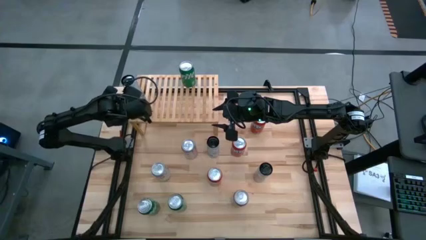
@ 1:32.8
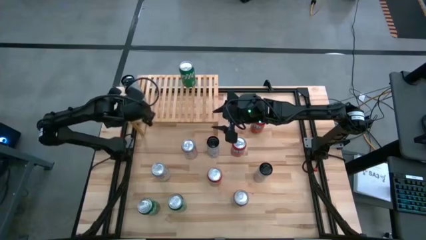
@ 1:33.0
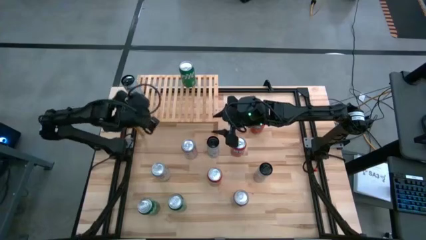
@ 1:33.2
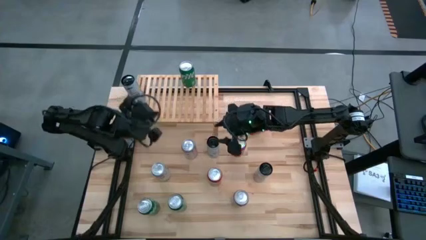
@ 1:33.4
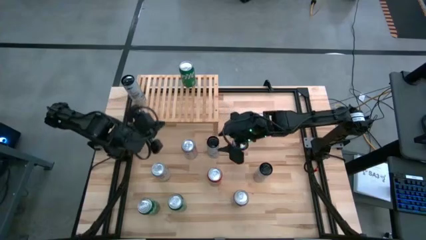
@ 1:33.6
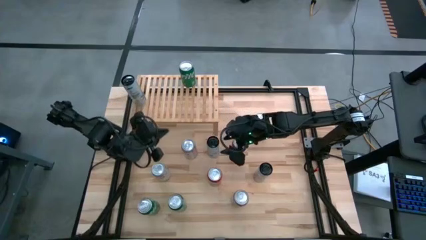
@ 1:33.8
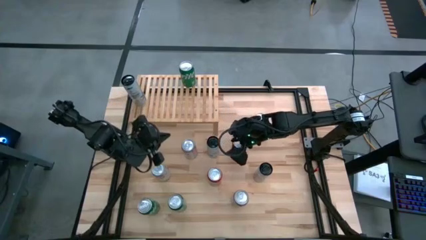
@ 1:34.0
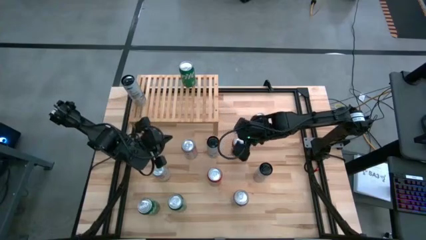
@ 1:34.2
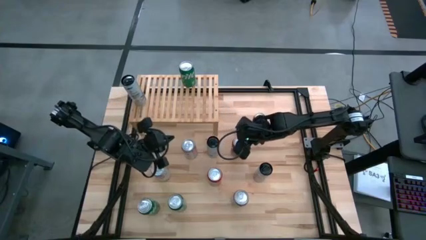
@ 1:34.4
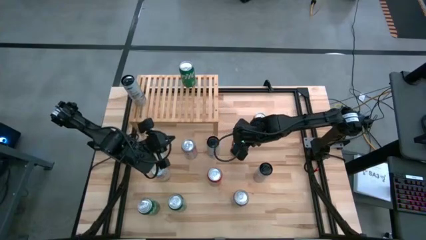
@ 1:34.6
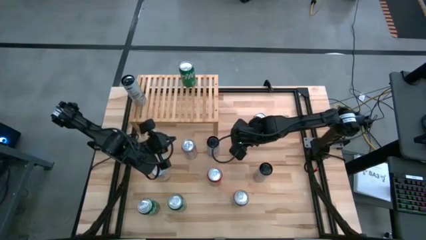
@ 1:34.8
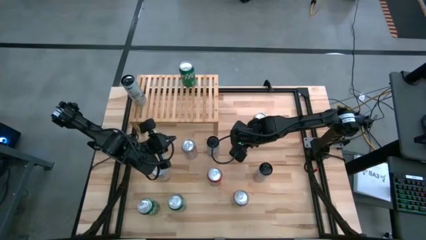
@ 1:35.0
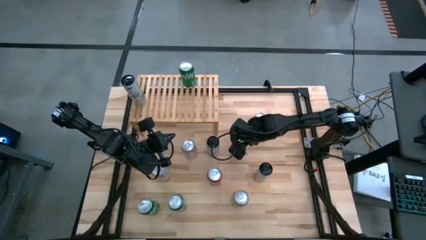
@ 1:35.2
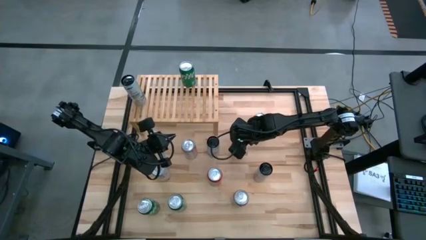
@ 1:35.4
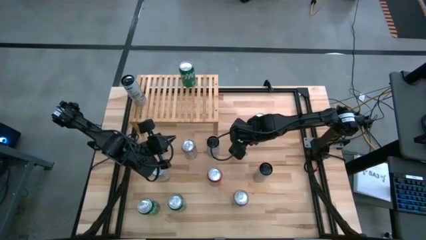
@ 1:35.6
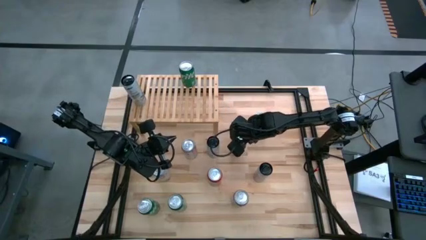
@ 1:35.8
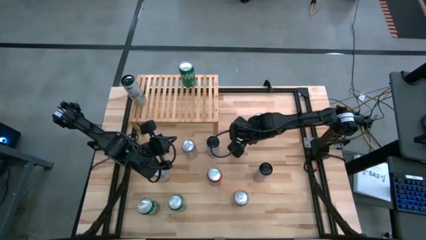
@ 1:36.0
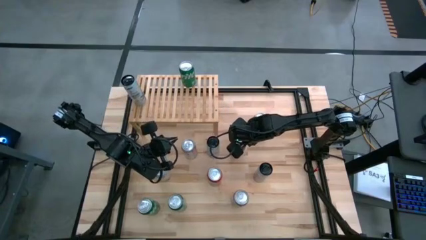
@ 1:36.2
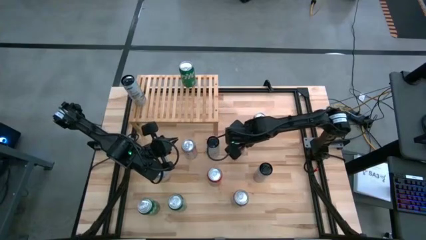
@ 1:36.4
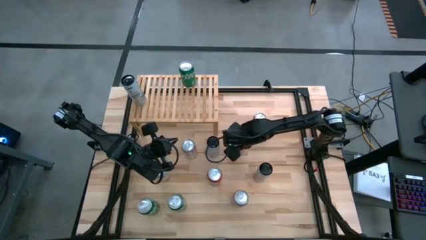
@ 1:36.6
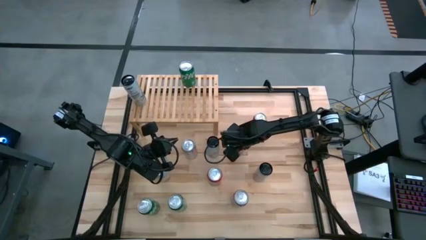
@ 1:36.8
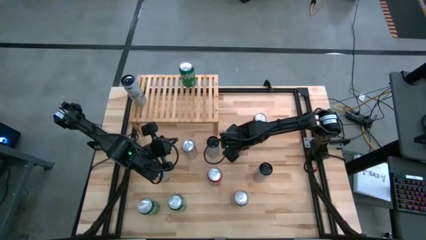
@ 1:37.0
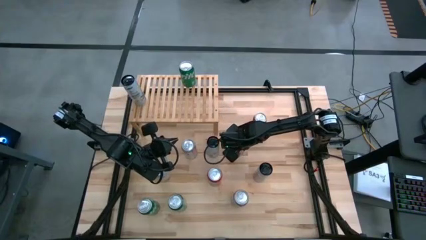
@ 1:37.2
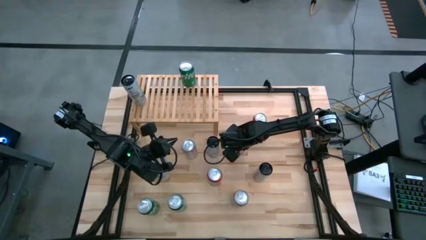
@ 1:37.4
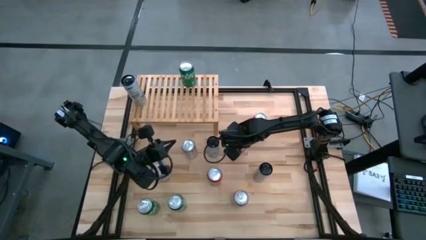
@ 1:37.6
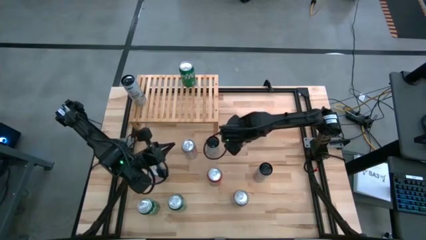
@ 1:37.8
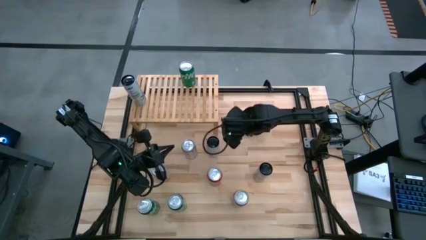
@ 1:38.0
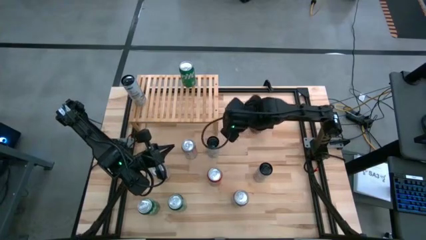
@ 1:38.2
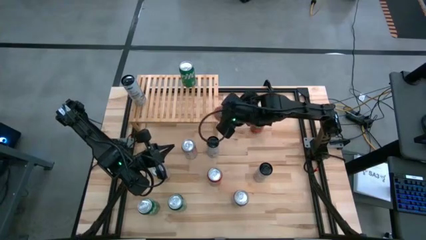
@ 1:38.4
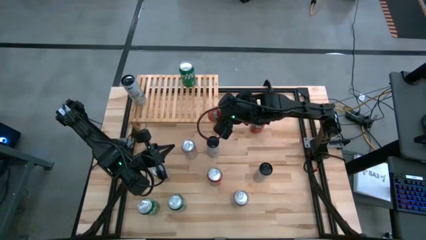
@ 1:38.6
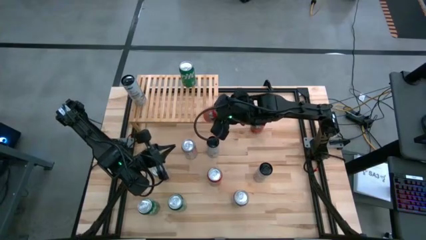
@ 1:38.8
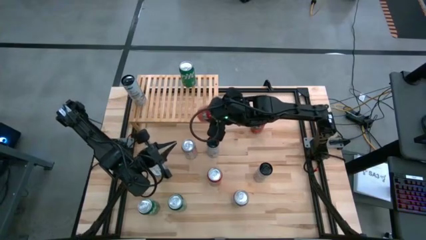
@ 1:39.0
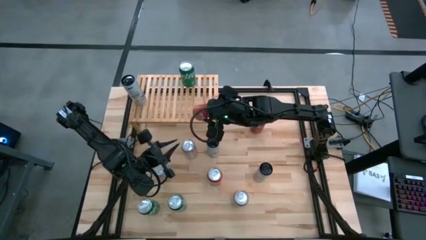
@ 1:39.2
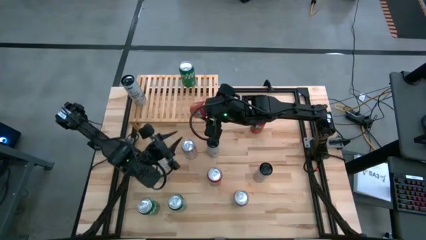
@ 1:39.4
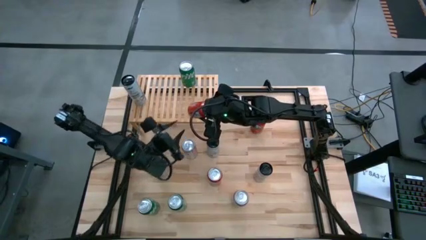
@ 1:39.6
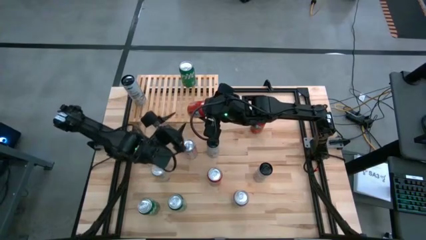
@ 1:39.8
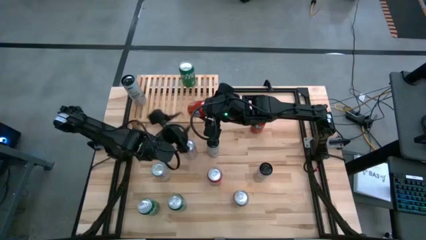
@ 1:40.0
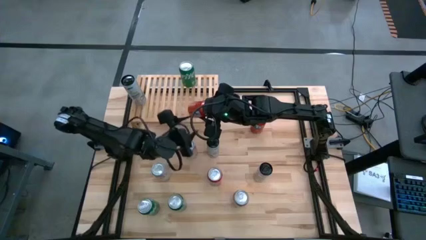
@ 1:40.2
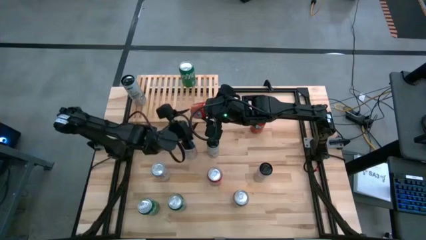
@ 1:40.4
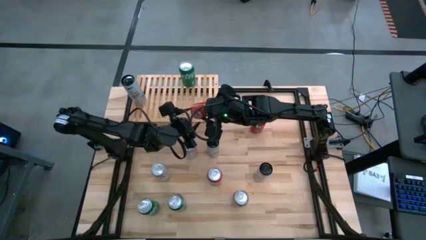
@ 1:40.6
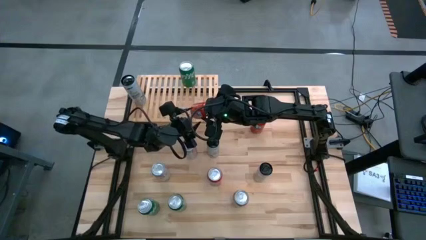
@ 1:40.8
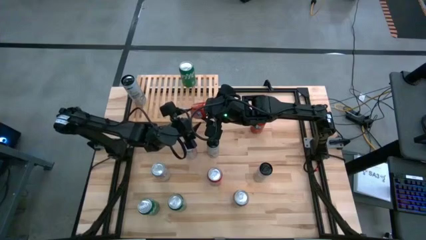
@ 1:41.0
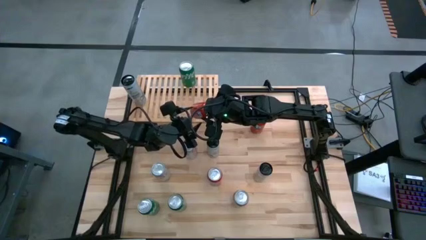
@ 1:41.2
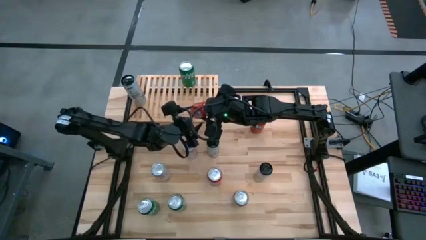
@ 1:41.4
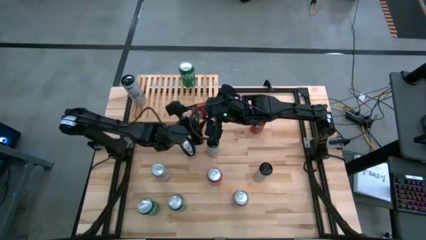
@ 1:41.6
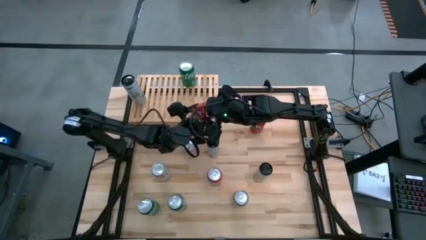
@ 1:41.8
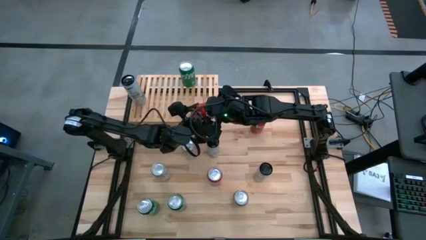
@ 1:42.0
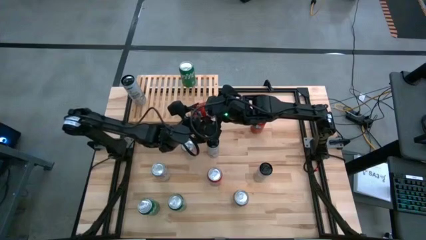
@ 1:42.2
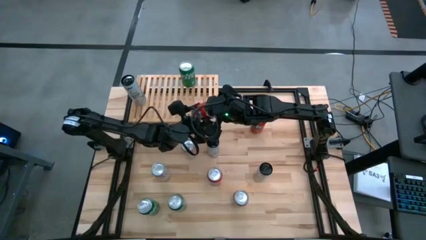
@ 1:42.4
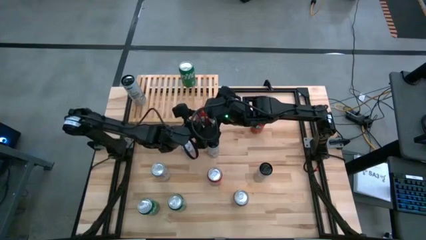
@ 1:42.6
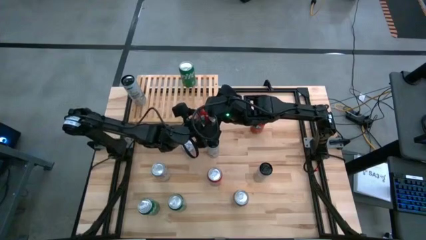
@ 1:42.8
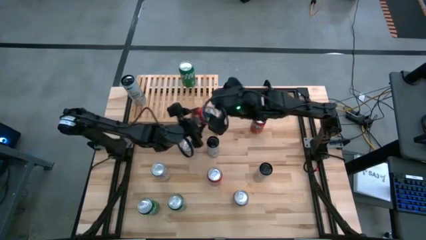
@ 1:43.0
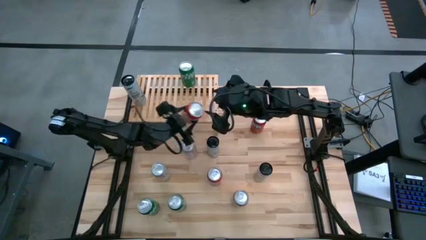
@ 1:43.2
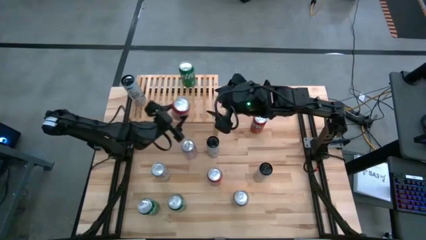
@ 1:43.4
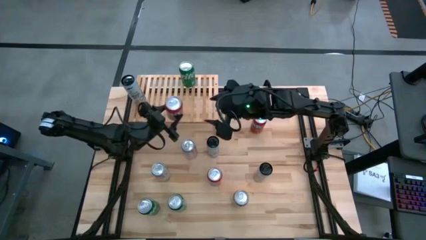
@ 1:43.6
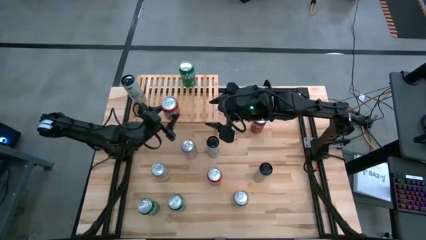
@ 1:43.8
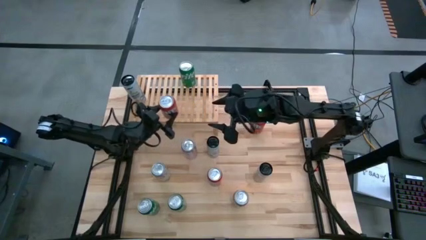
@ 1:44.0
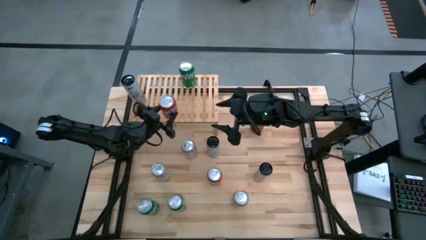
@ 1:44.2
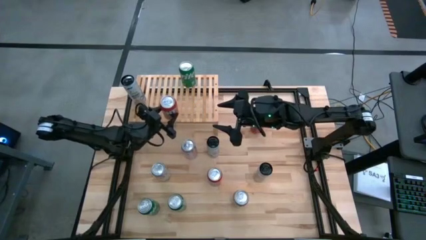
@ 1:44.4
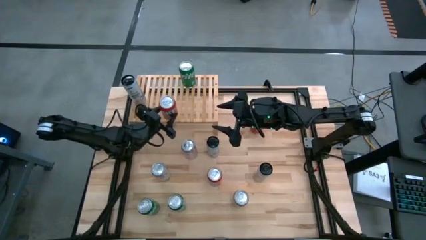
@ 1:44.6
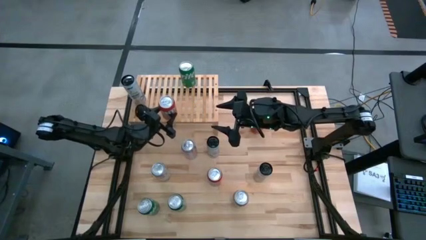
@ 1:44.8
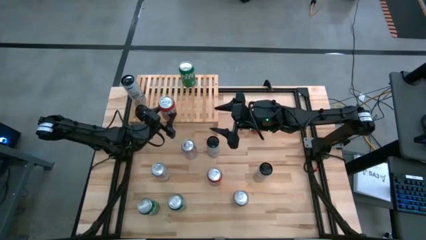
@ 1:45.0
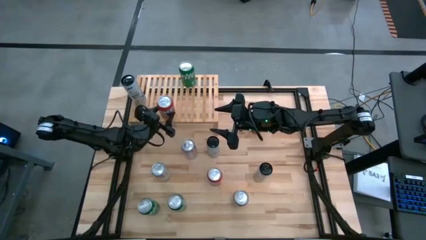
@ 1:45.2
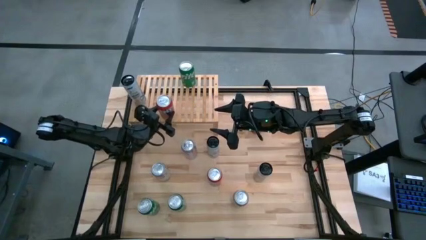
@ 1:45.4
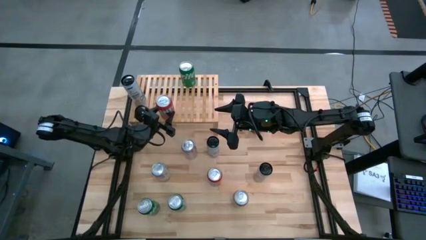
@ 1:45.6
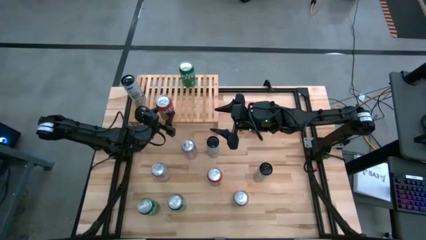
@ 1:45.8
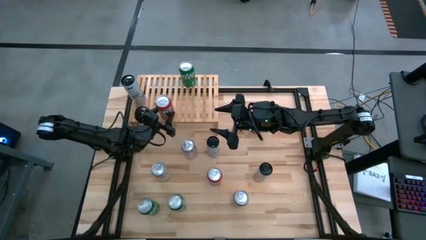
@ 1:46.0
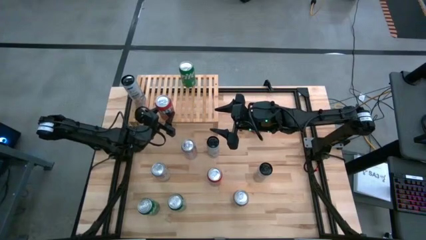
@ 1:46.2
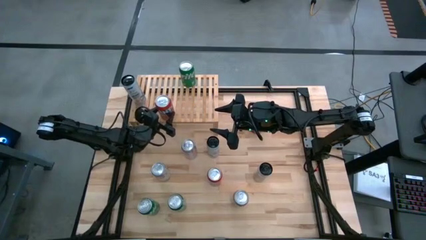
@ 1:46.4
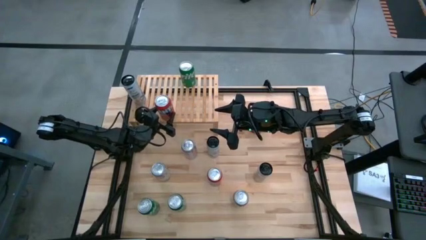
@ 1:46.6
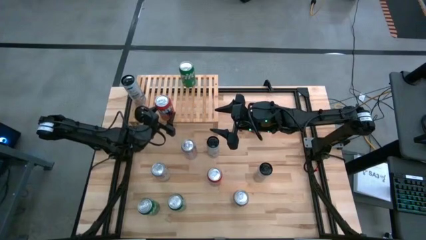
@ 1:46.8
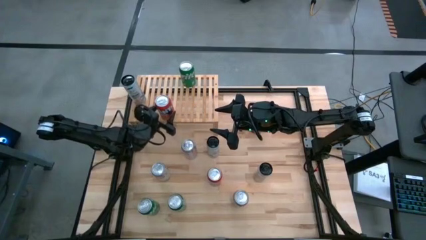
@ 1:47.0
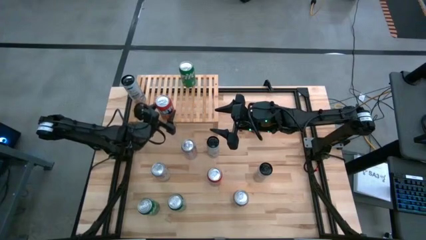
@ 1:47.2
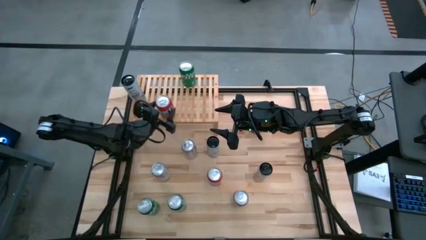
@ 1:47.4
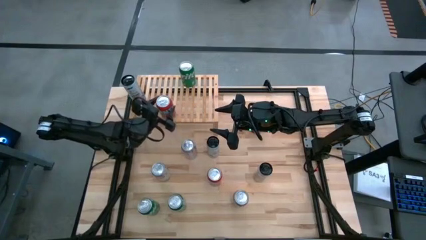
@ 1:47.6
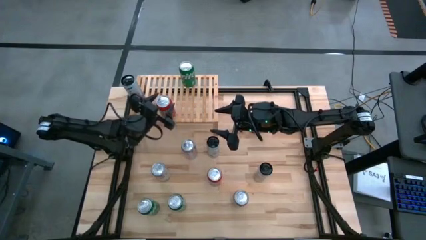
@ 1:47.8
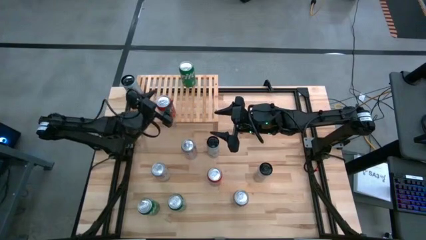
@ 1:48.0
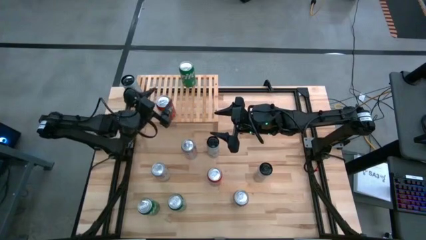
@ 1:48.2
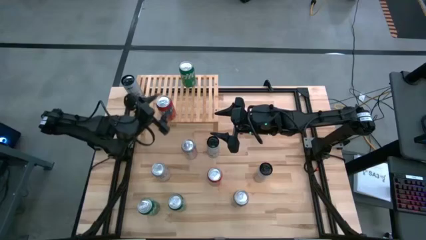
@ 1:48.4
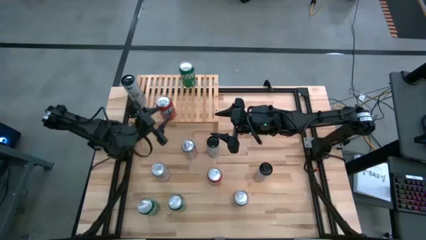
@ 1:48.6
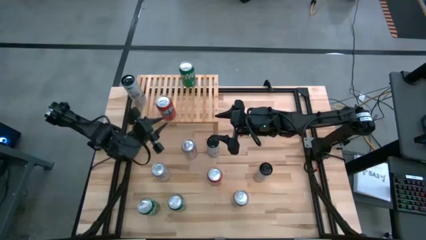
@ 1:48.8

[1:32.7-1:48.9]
Task: Place canned beverage on shelf
Put the middle orange soda can on the shelf
